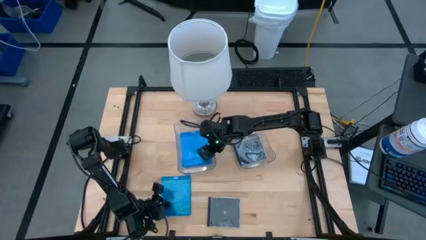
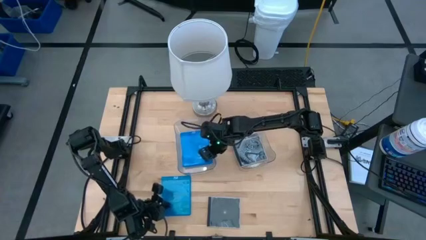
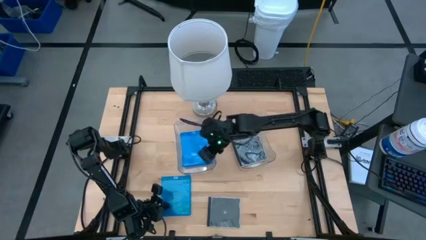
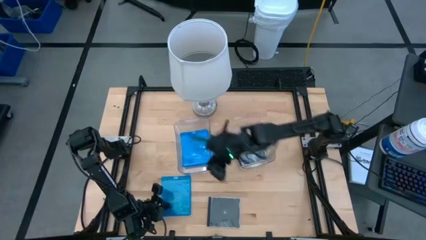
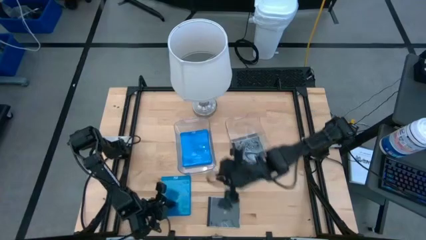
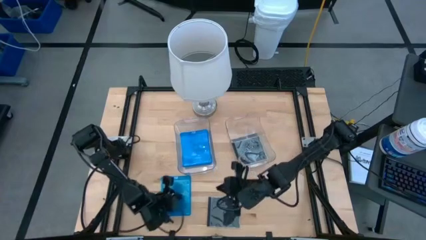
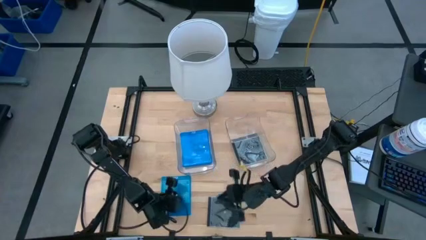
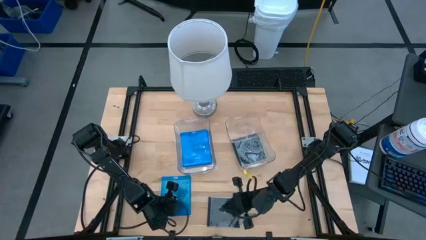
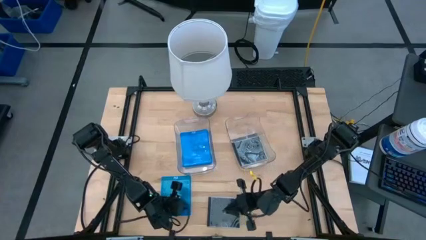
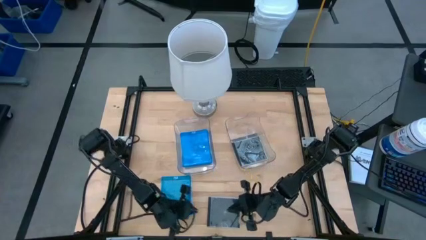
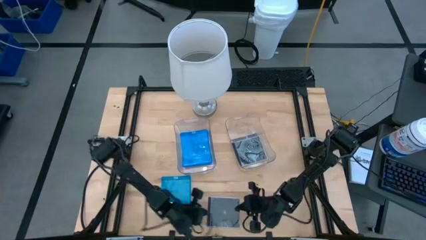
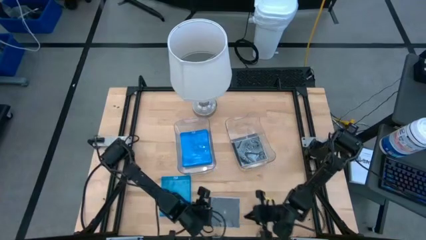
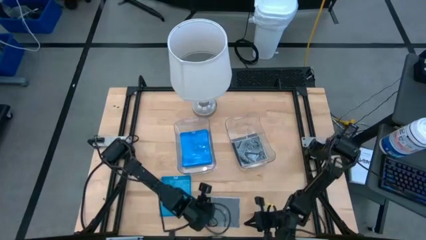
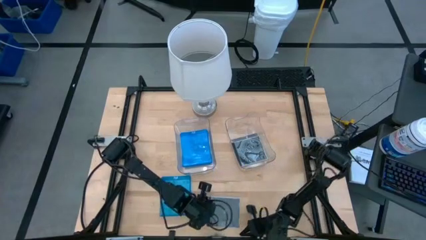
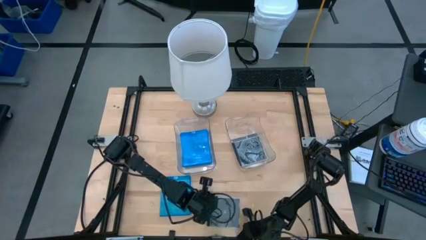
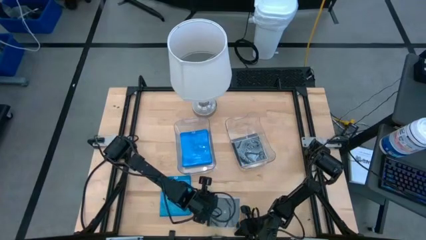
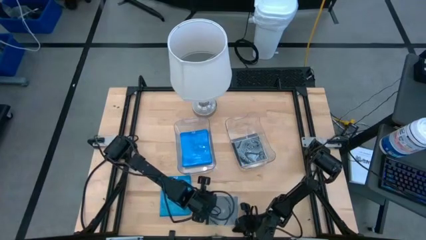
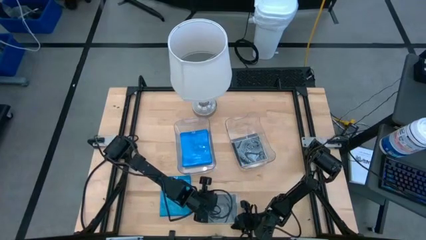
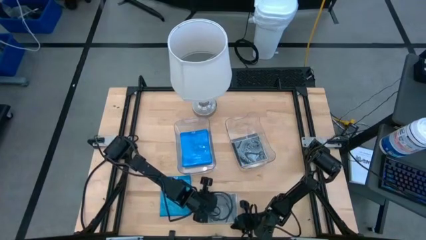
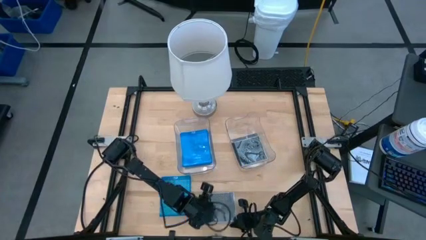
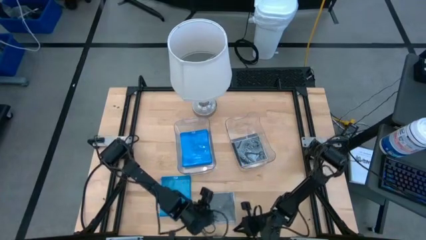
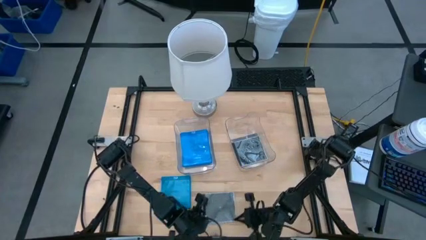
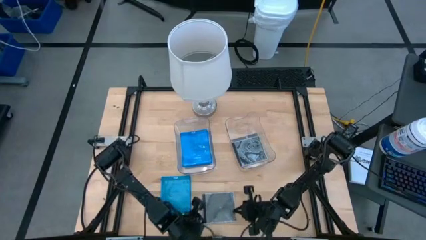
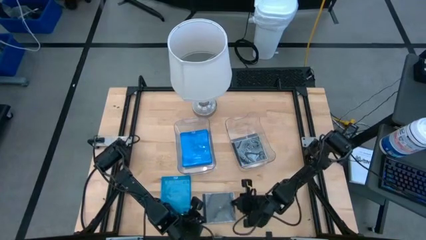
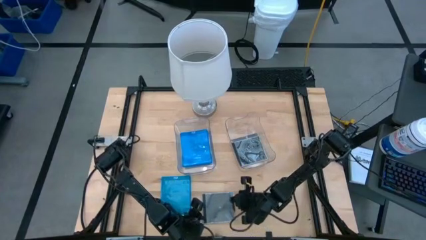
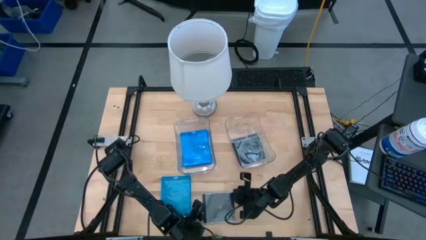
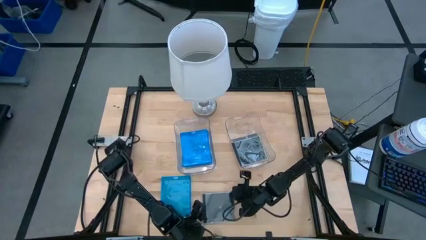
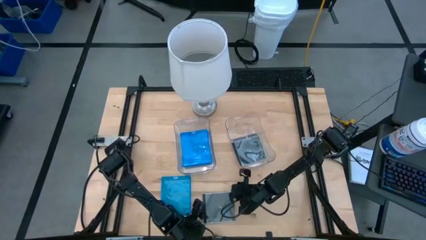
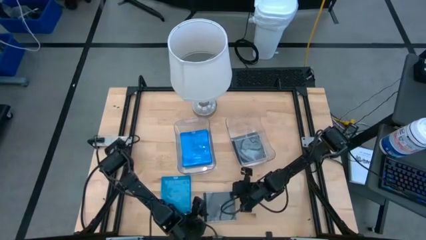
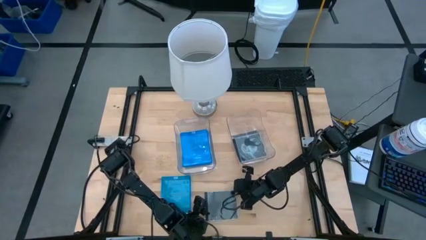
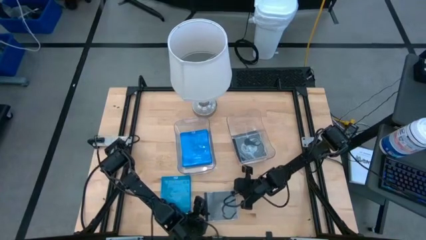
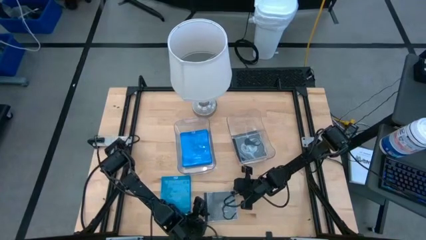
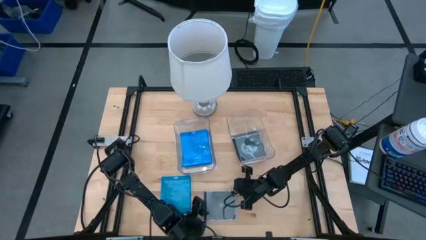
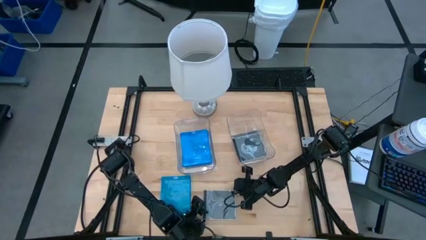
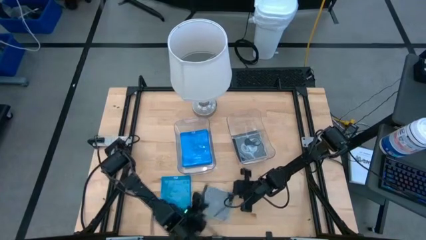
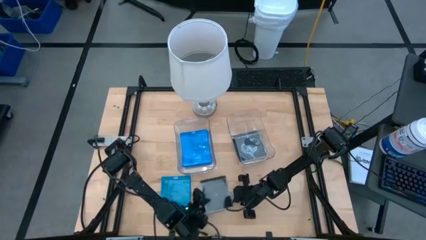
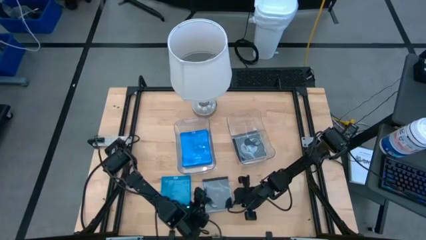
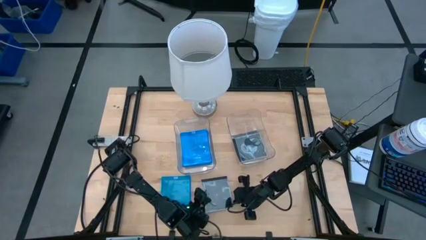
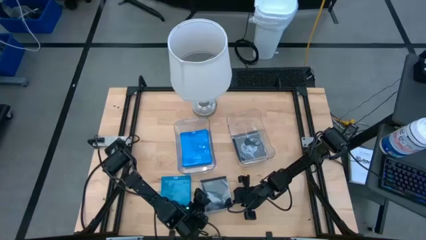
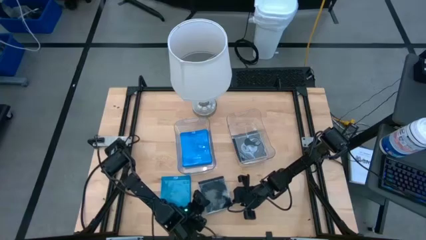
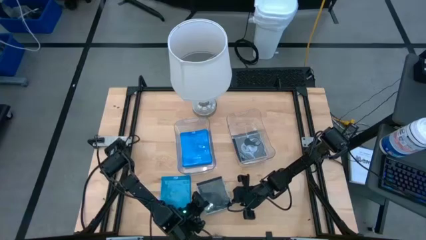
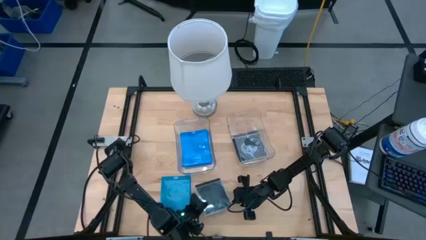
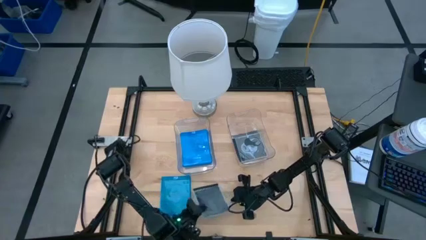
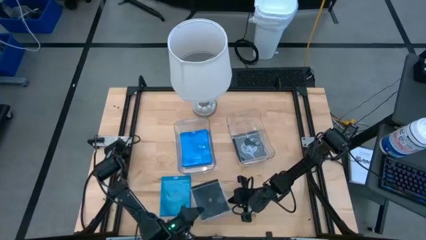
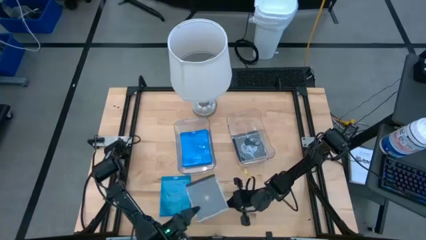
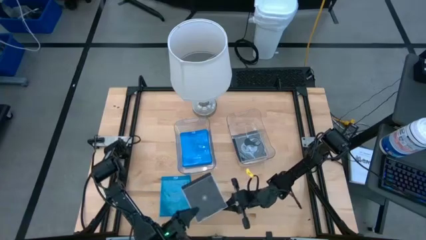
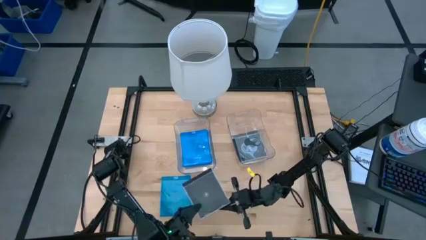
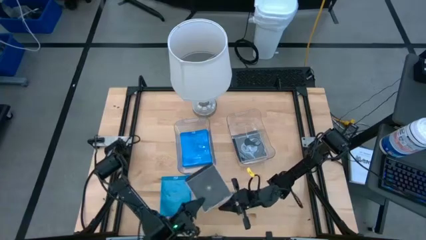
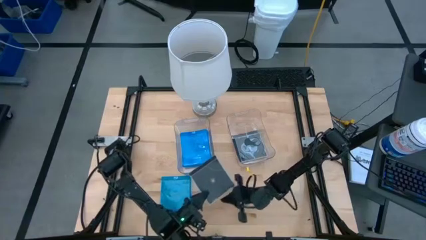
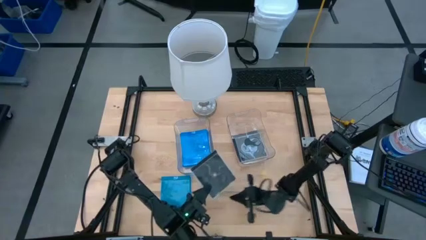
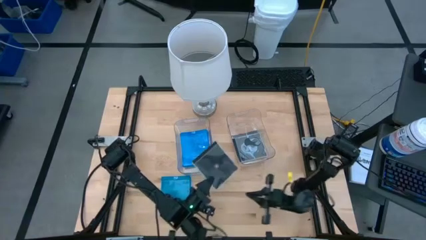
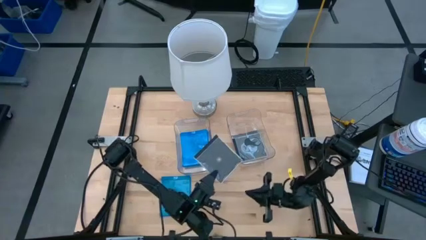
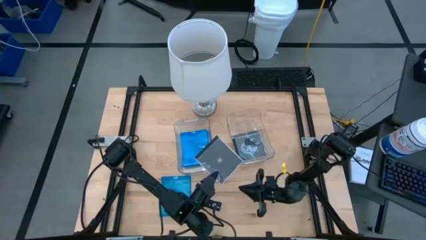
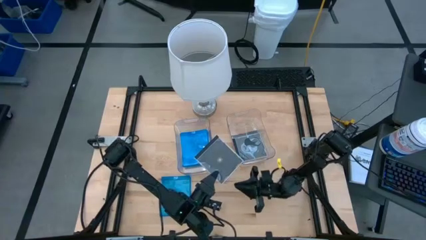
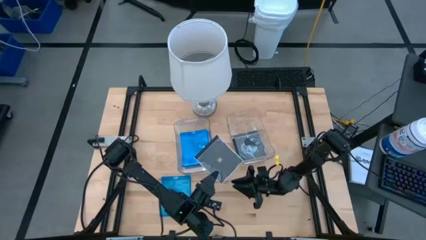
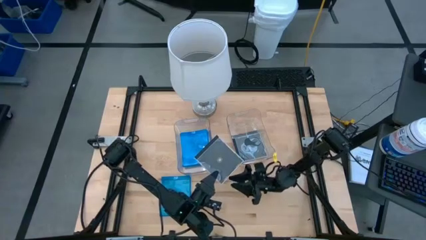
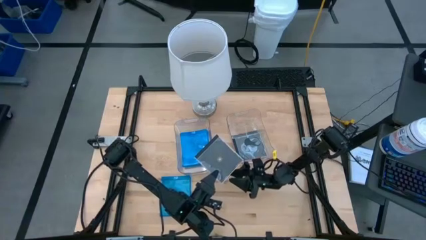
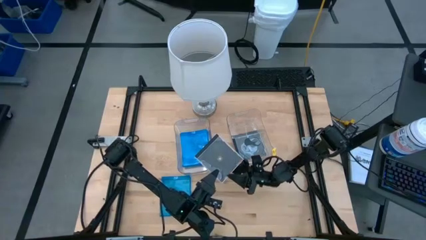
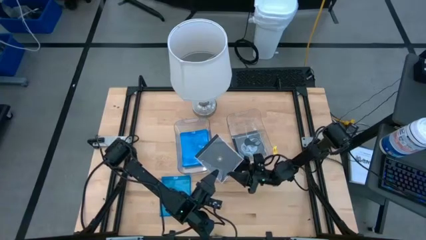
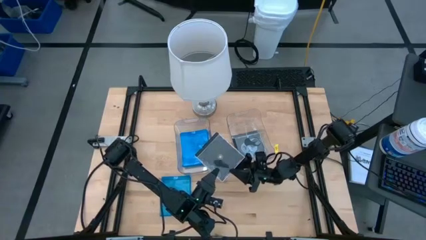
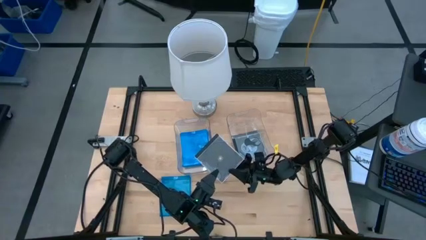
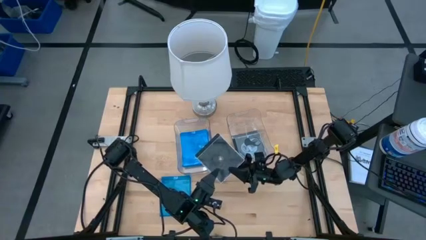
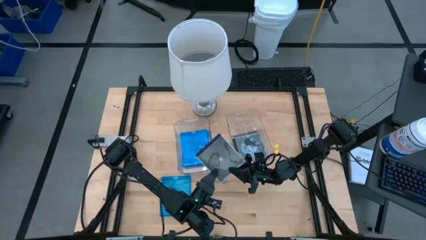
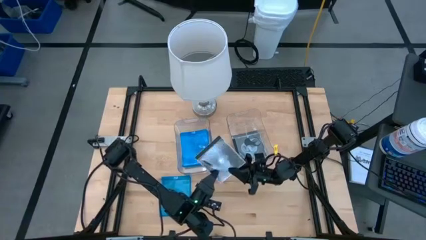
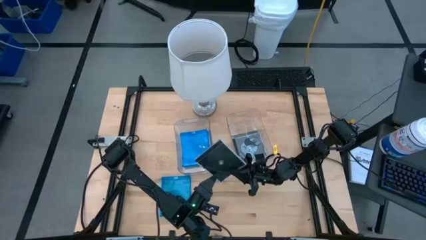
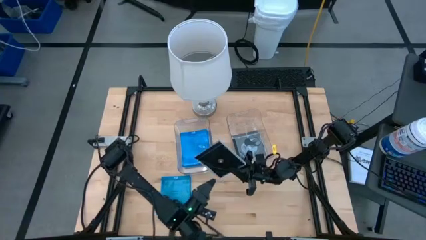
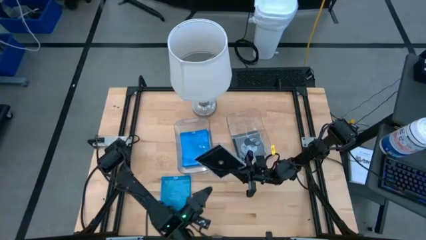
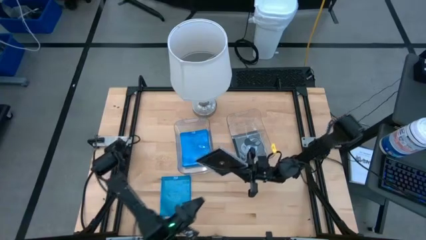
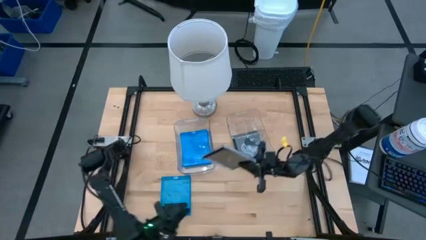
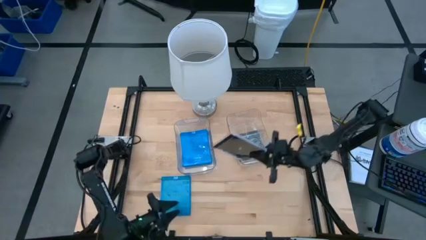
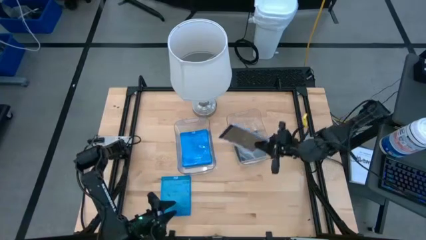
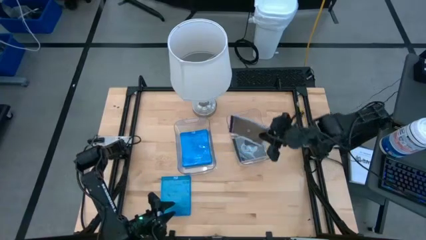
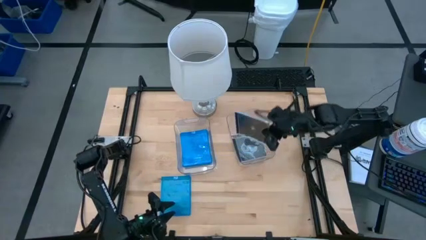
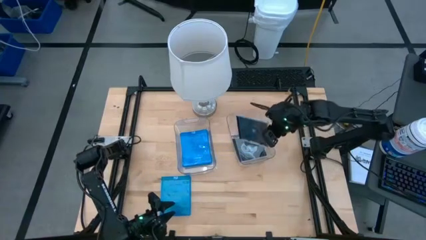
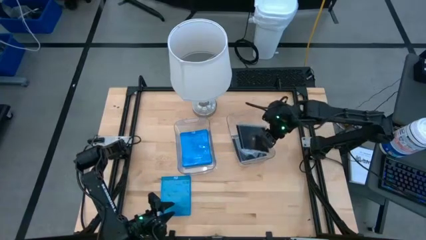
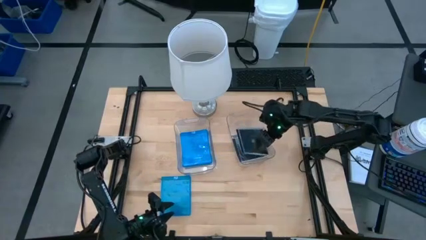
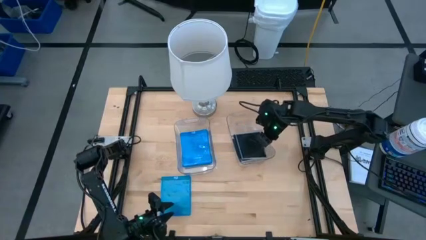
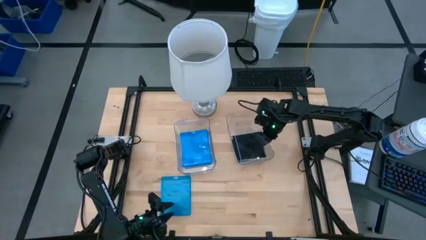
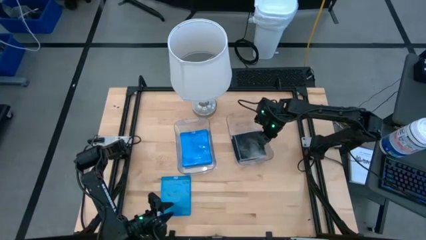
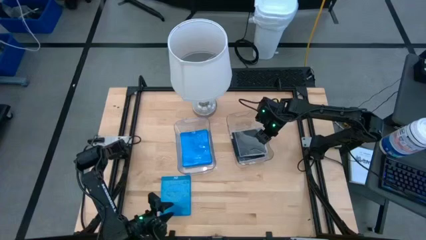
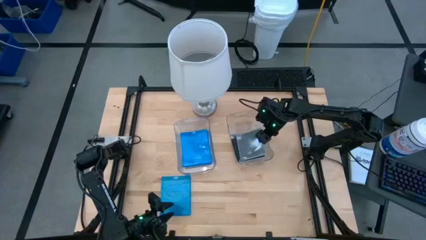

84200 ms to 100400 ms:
Task: Pick & place jewel cases by type
Put the black CD case into the right transparent bin
